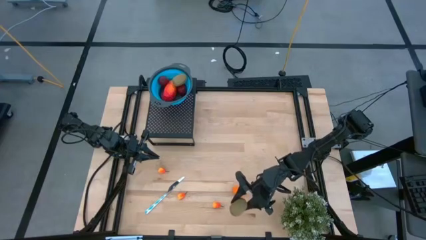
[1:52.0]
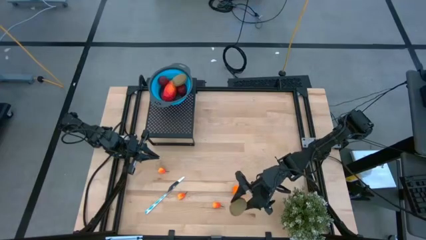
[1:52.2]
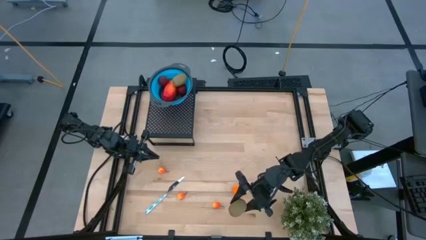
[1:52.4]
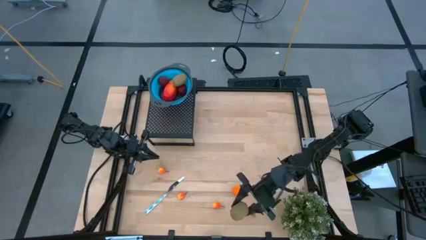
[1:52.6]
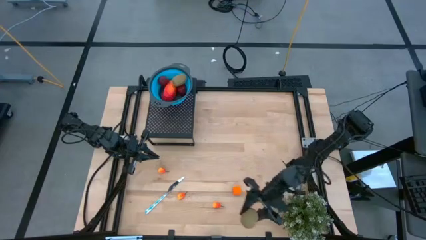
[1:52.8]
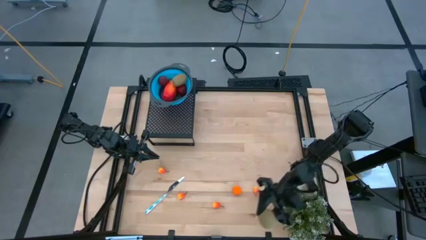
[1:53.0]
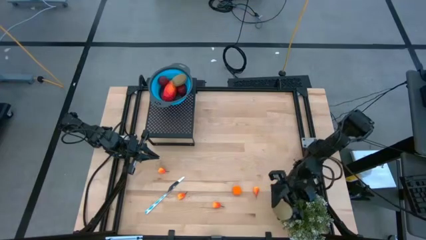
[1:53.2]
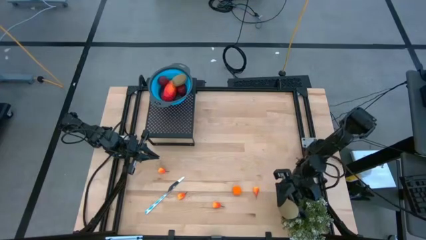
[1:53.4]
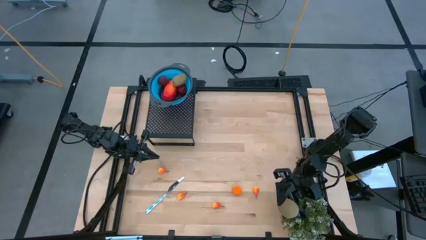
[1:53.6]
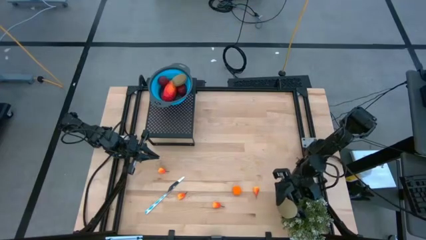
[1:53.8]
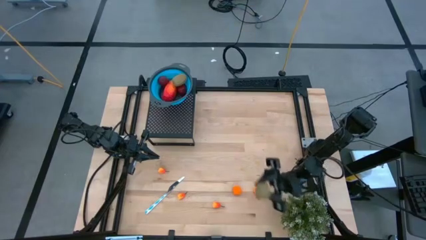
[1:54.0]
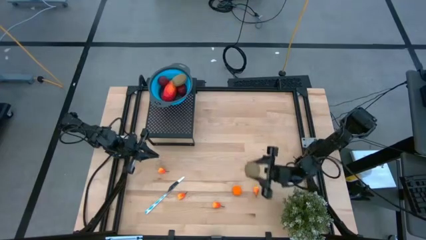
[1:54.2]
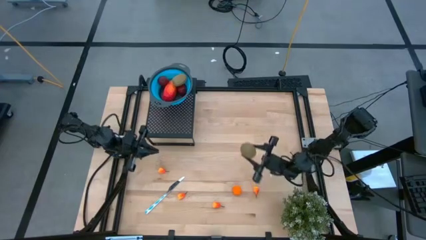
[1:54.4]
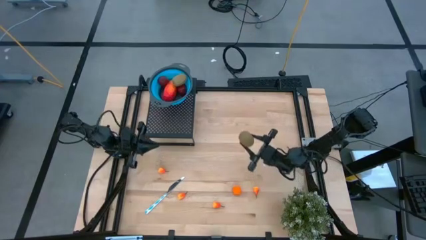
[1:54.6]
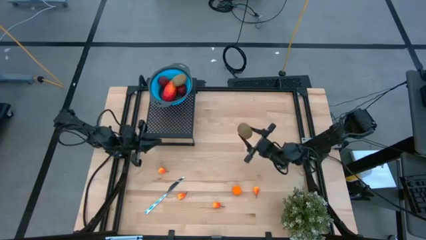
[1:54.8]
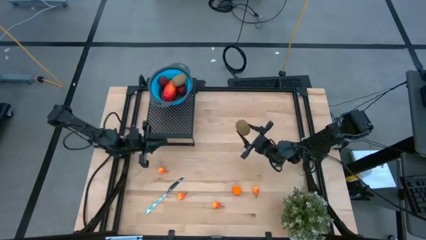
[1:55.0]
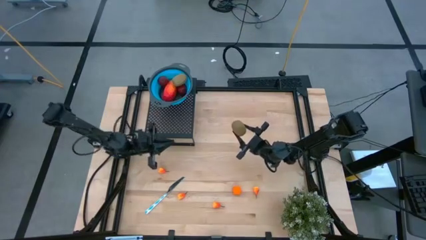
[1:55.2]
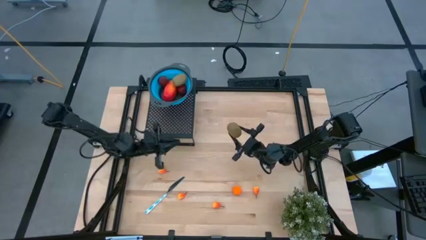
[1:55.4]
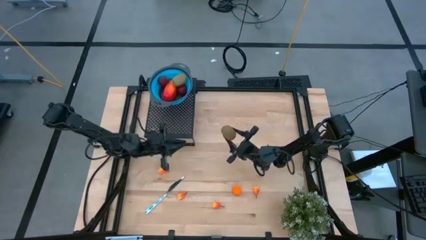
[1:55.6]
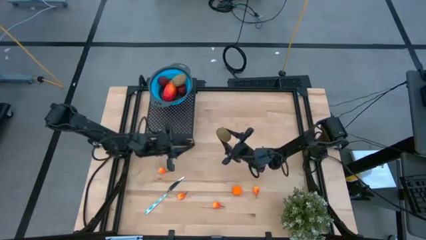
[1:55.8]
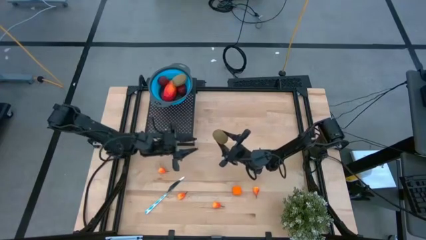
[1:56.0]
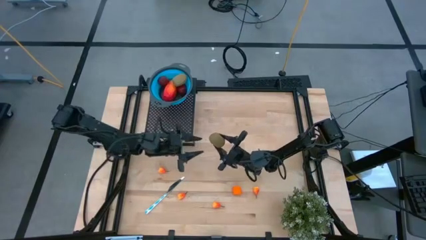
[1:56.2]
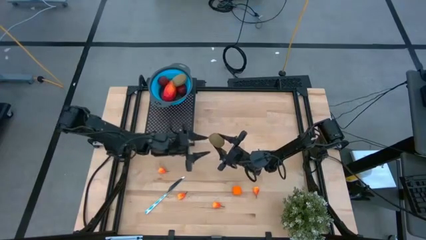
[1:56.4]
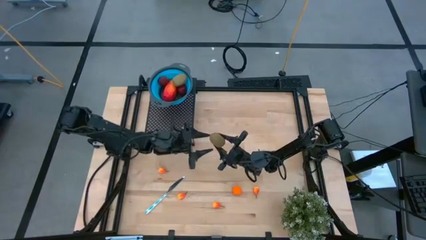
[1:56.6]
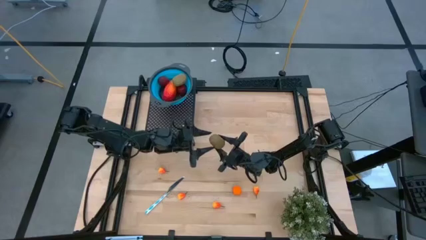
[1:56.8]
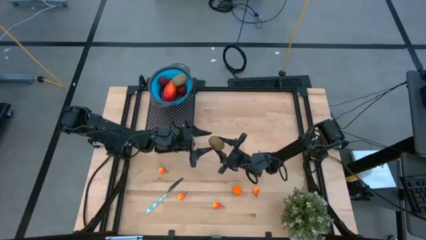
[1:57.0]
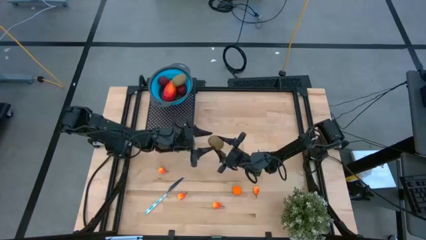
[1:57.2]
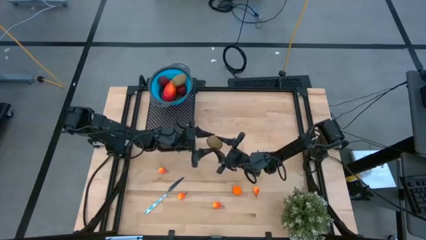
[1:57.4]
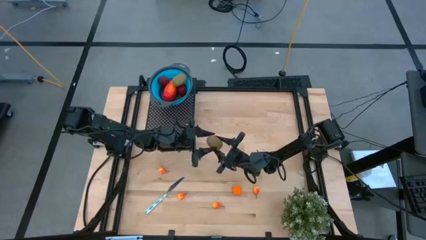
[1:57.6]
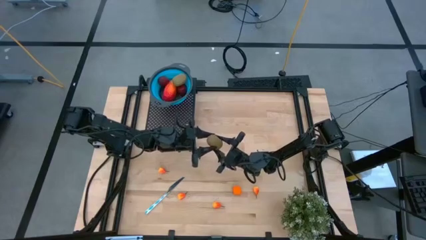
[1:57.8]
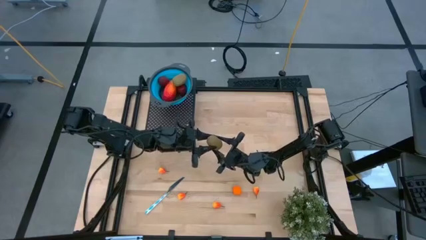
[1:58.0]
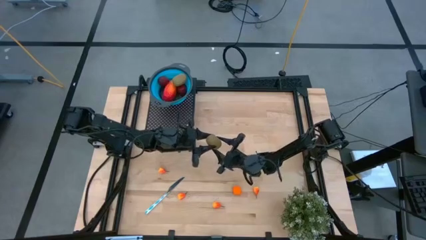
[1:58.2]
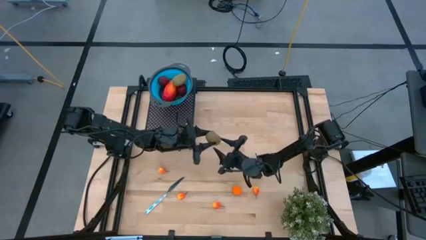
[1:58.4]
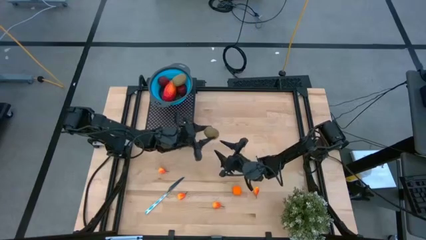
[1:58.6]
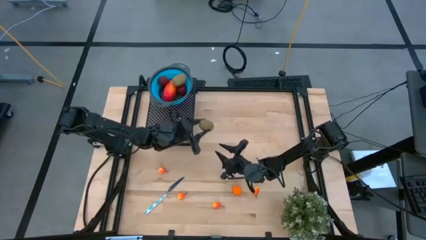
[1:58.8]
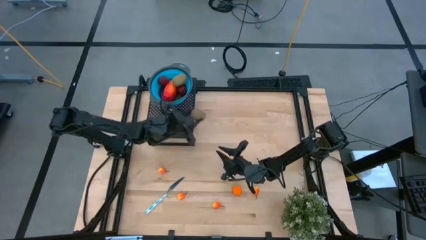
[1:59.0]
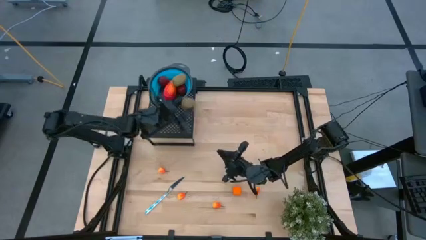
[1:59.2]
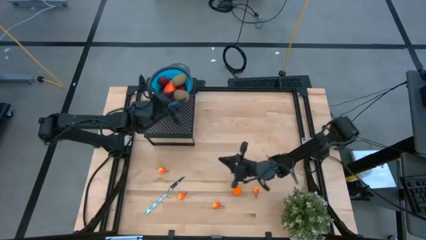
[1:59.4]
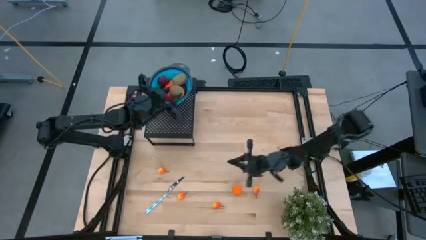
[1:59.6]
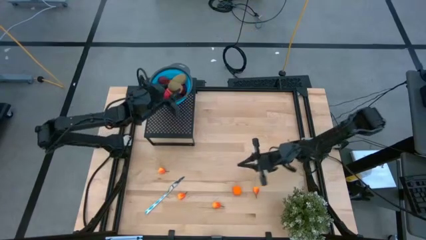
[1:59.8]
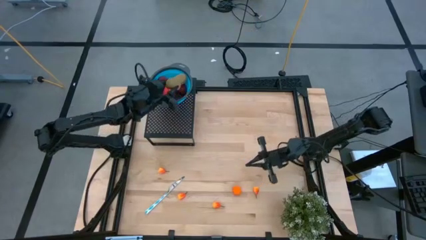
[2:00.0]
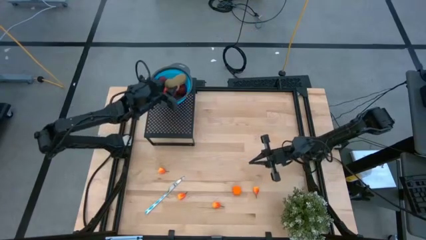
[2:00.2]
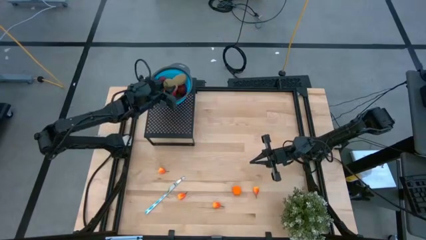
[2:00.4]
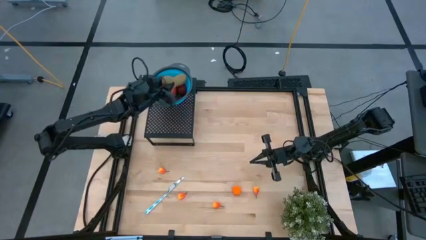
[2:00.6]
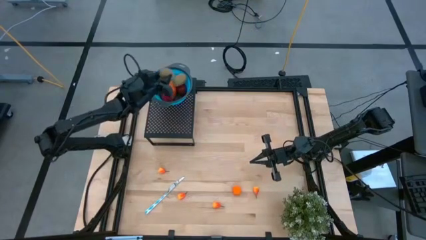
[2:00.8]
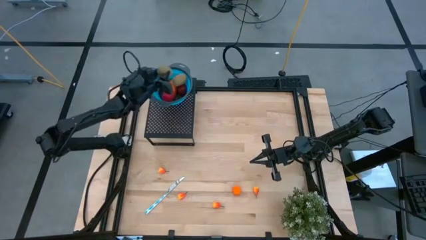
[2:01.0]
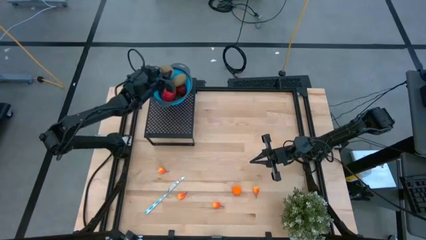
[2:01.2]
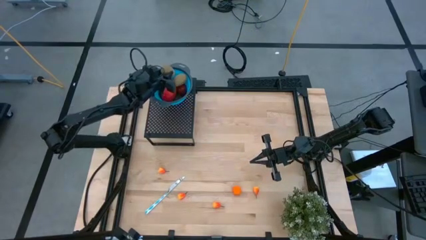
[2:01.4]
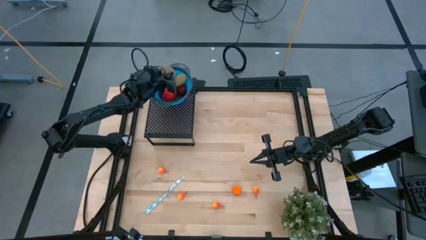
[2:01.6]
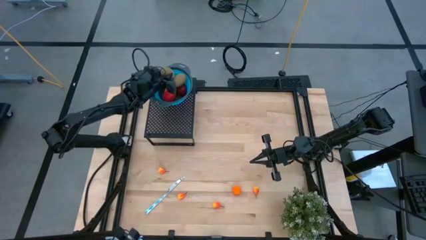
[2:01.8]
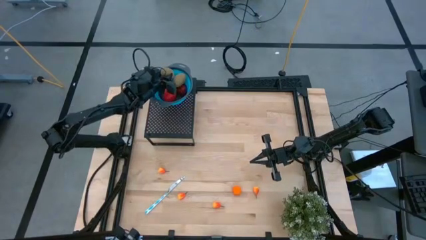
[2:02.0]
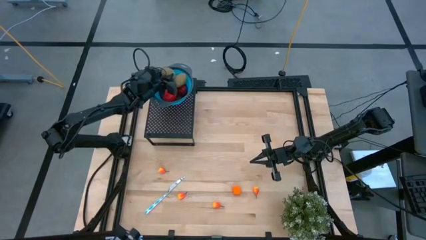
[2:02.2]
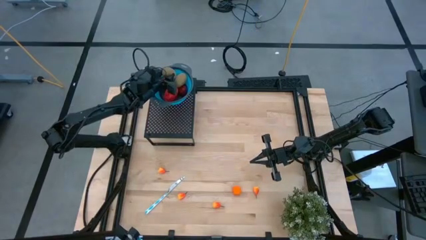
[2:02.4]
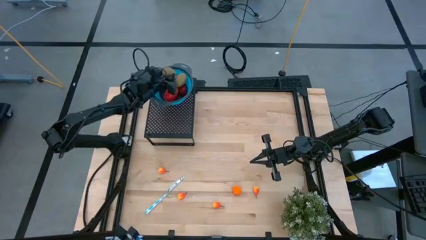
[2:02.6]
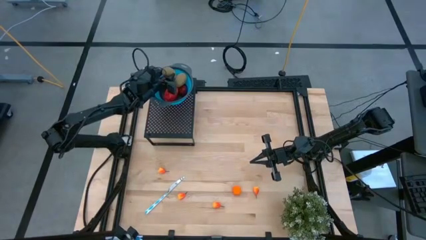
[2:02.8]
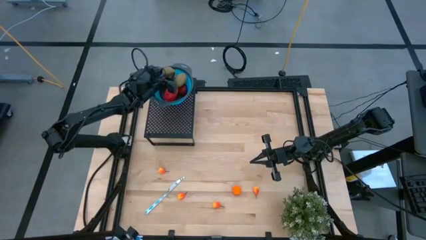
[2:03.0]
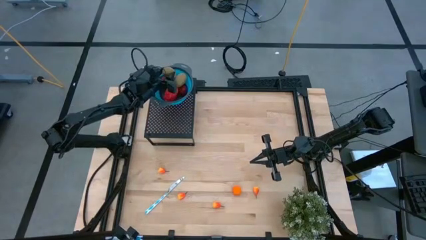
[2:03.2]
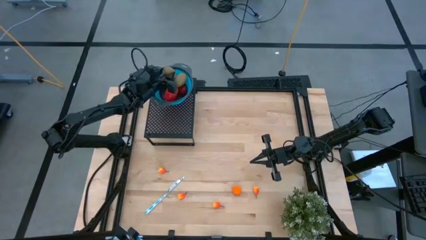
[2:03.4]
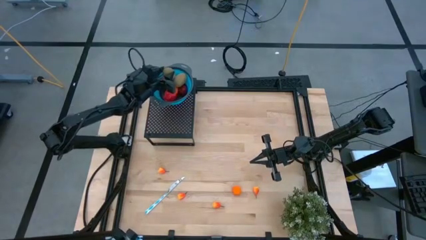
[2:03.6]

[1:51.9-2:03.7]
Task: Pick & Place Fruit
Put the kiwi into the blue strainer bowl on the shelf

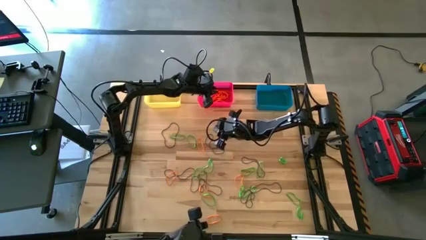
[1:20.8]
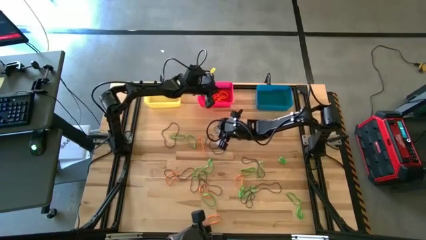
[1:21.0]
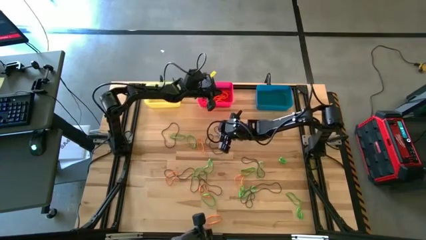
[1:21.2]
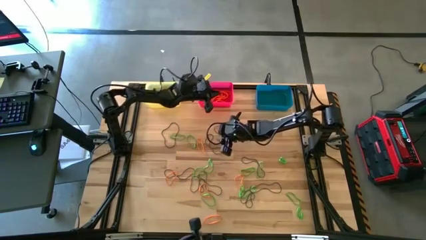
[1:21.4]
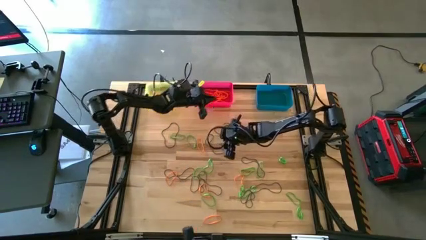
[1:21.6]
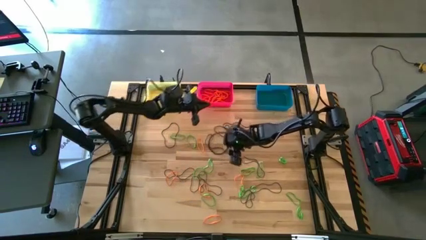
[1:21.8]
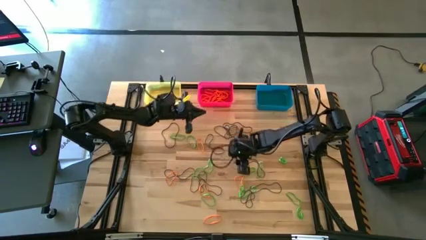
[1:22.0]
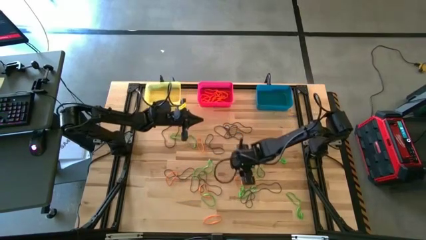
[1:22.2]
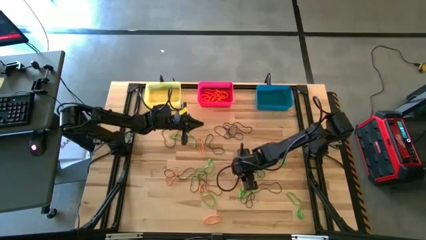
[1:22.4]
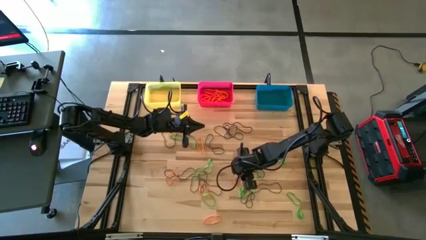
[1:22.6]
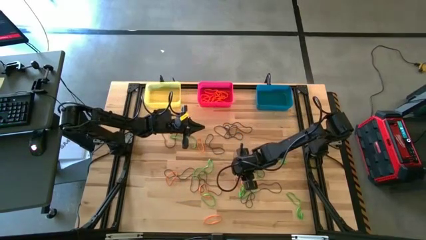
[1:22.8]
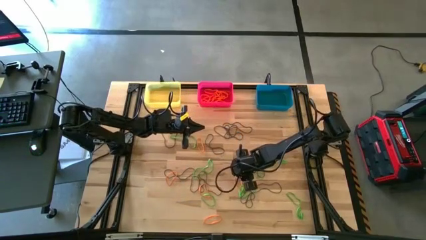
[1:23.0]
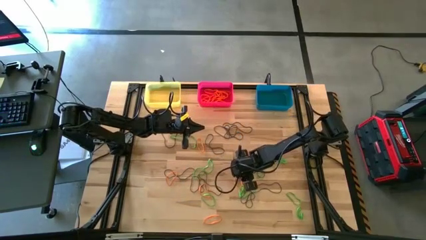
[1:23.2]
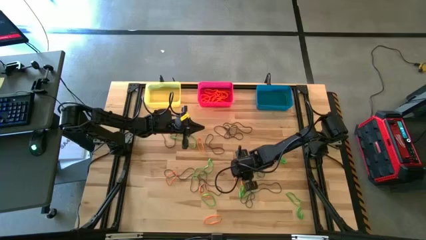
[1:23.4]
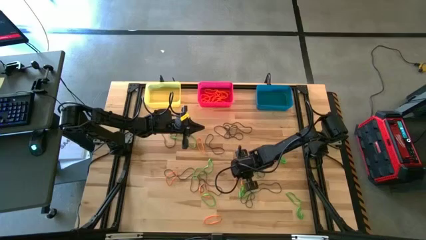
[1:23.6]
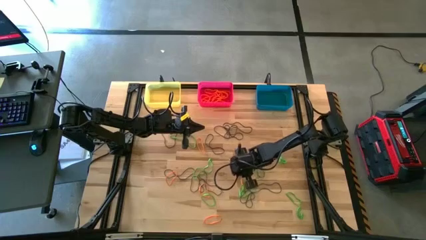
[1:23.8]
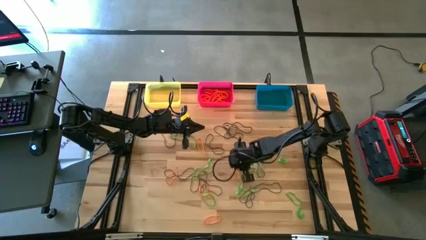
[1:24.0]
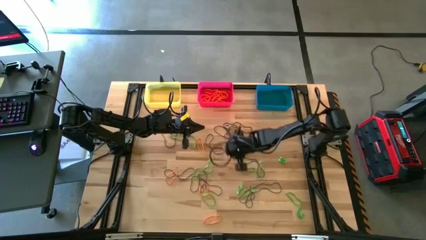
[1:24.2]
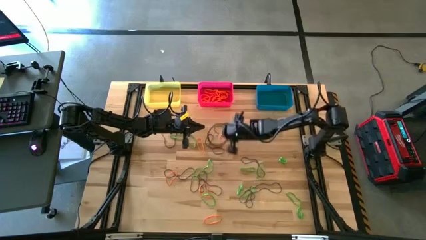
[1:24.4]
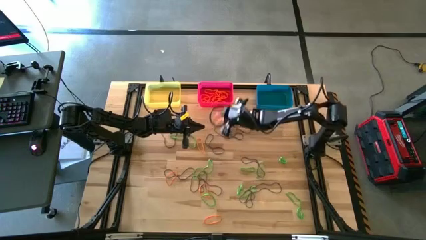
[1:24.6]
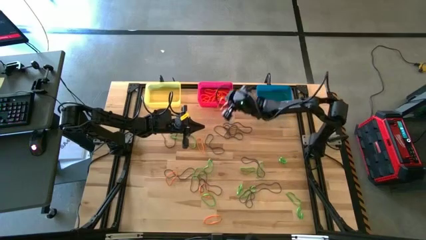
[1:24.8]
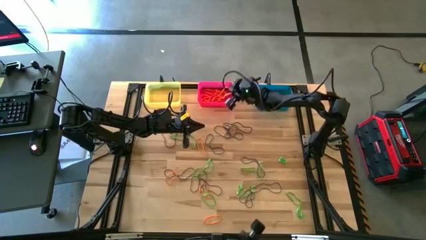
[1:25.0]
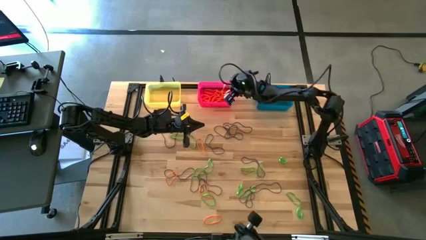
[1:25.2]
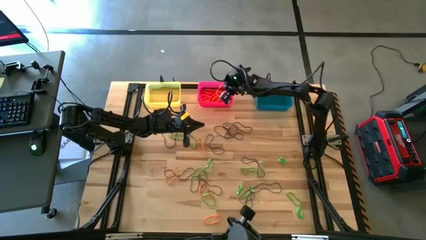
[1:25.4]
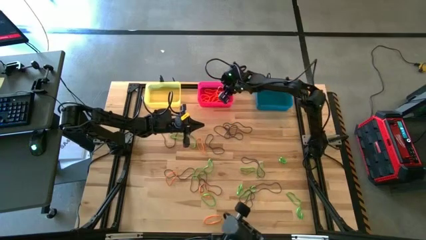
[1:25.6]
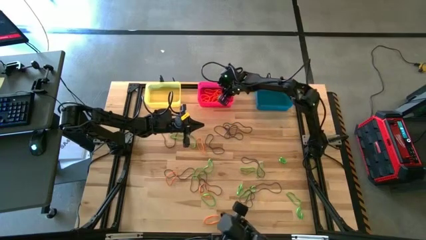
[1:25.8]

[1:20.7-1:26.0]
Task: Sort rubber bands into baskets
Put the orange rubber band into the pink bin
